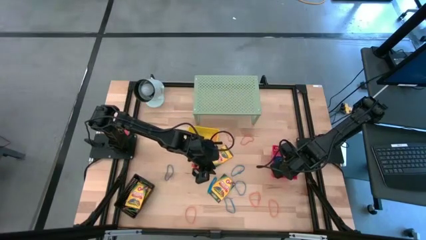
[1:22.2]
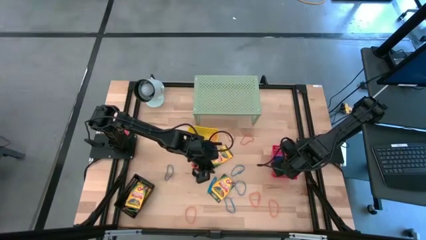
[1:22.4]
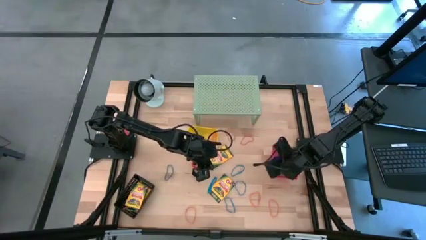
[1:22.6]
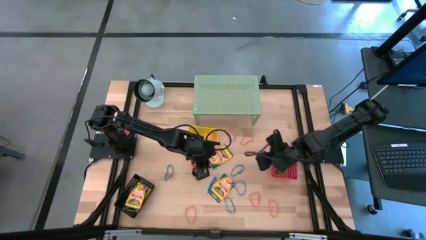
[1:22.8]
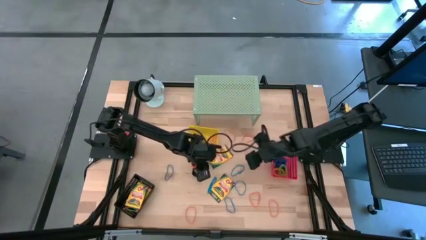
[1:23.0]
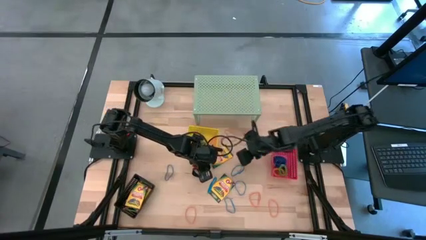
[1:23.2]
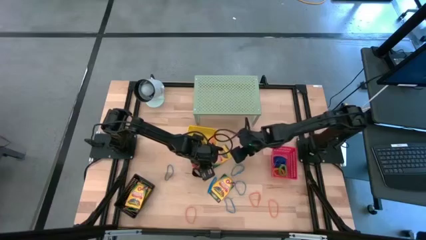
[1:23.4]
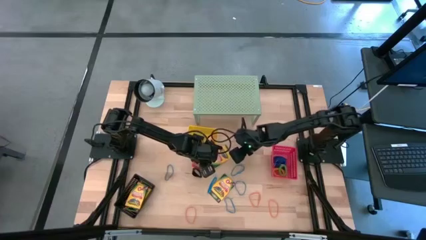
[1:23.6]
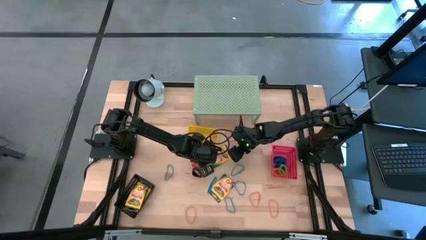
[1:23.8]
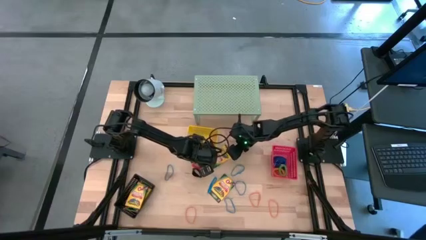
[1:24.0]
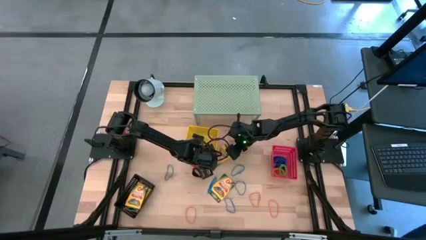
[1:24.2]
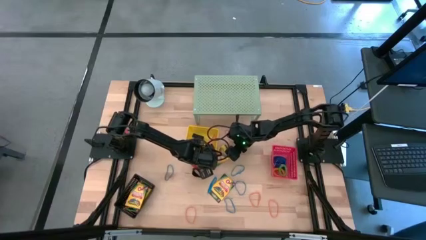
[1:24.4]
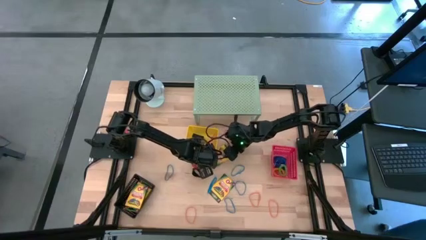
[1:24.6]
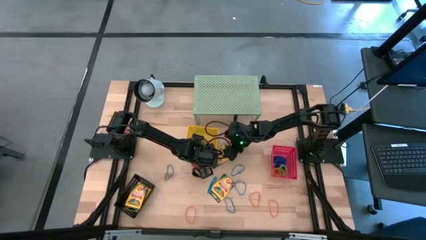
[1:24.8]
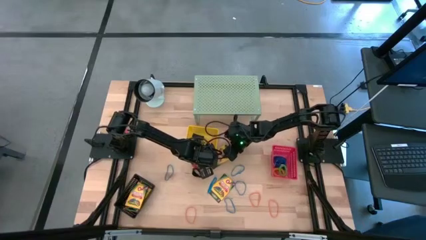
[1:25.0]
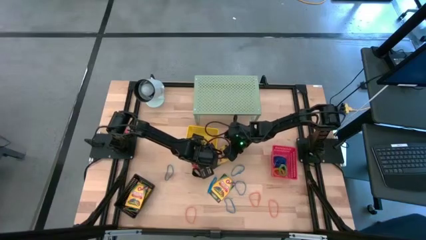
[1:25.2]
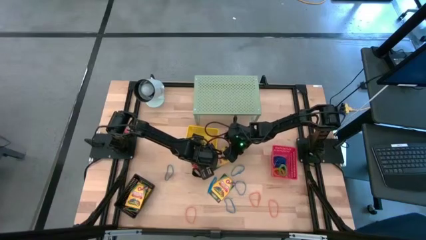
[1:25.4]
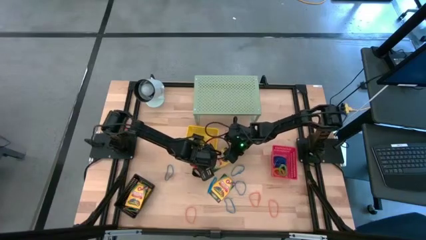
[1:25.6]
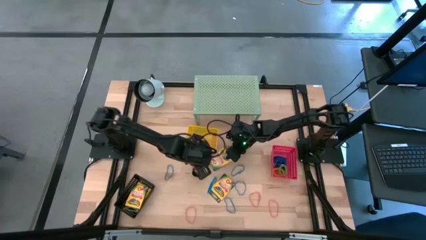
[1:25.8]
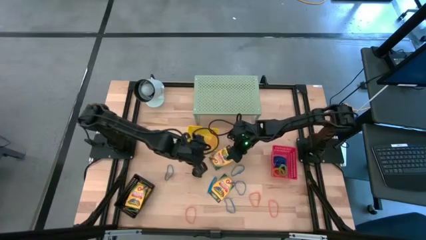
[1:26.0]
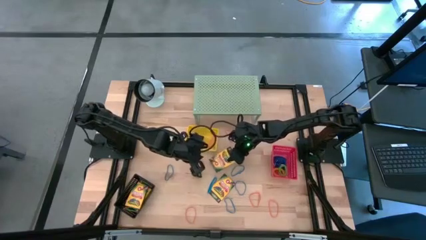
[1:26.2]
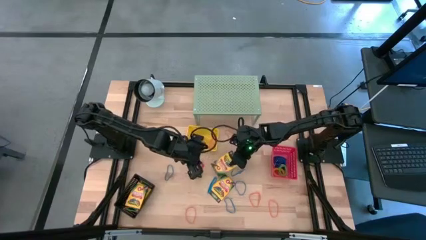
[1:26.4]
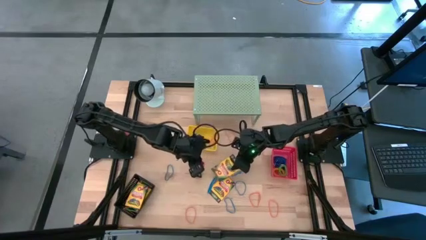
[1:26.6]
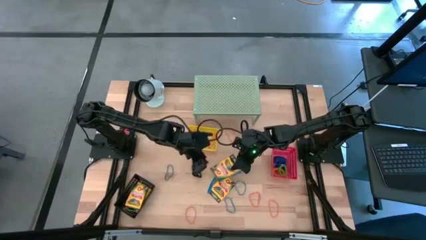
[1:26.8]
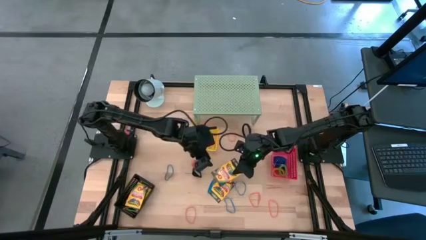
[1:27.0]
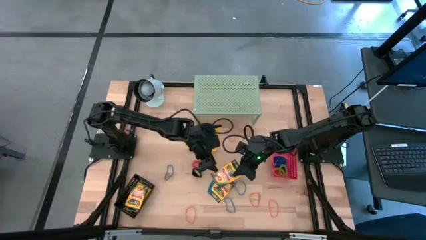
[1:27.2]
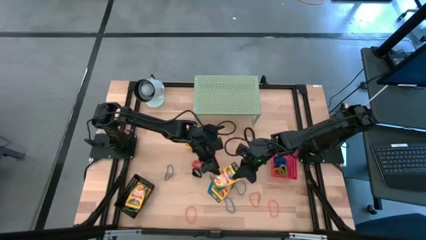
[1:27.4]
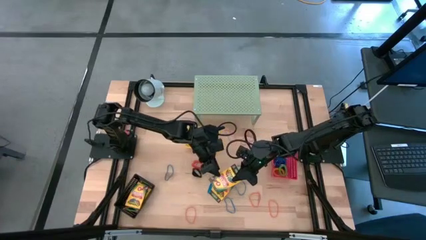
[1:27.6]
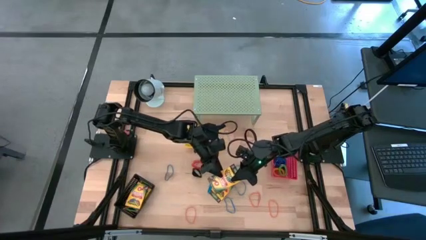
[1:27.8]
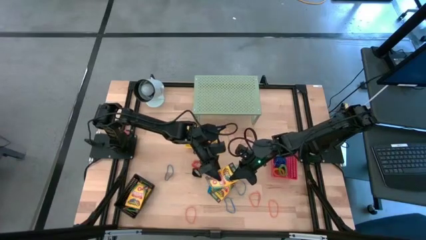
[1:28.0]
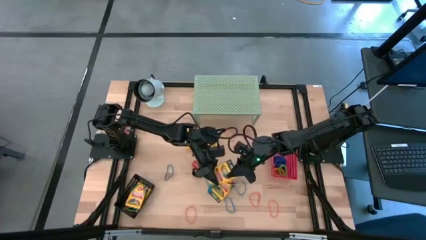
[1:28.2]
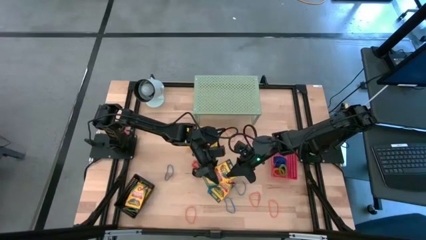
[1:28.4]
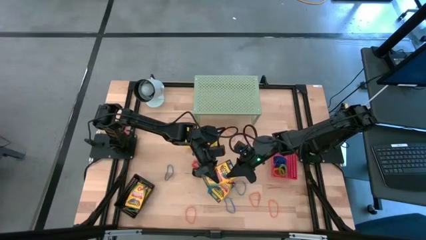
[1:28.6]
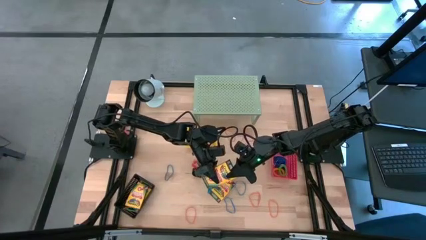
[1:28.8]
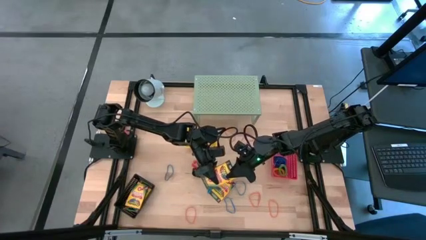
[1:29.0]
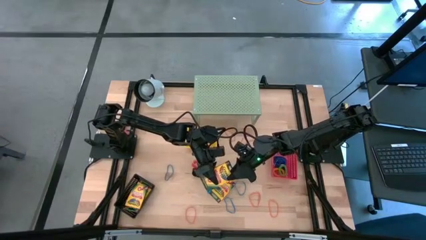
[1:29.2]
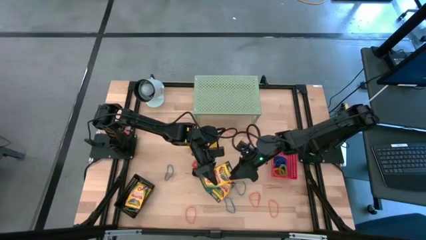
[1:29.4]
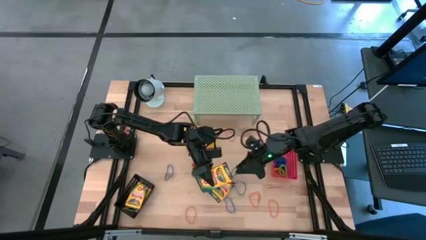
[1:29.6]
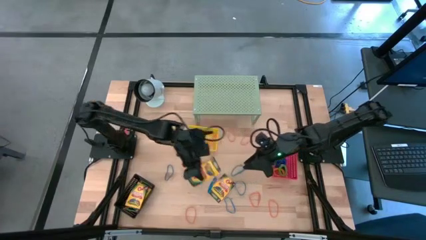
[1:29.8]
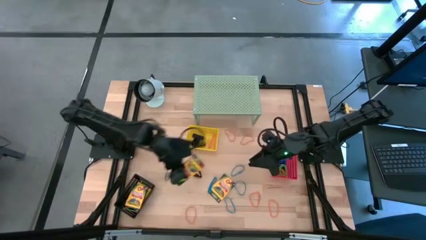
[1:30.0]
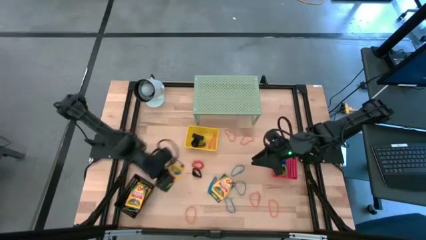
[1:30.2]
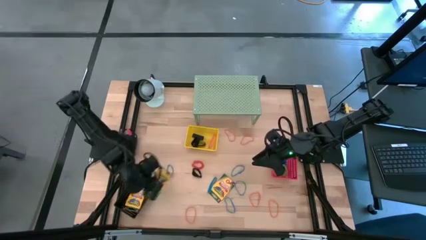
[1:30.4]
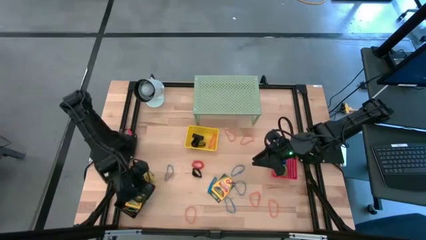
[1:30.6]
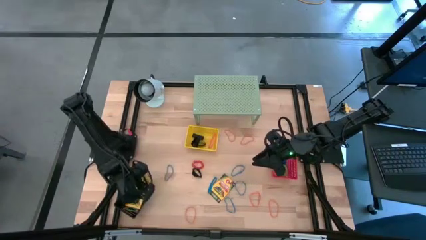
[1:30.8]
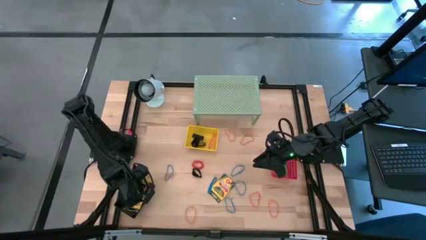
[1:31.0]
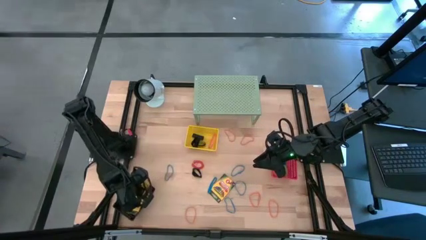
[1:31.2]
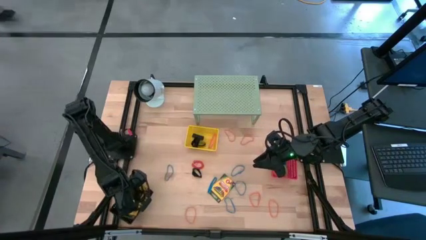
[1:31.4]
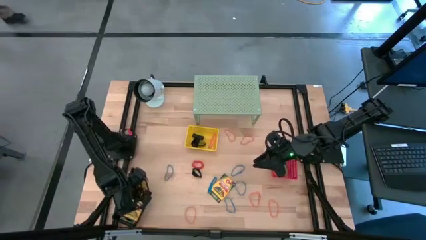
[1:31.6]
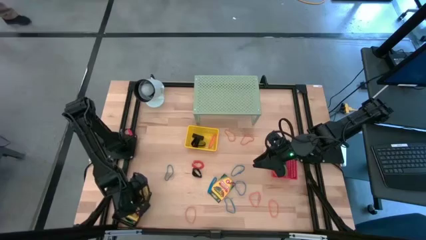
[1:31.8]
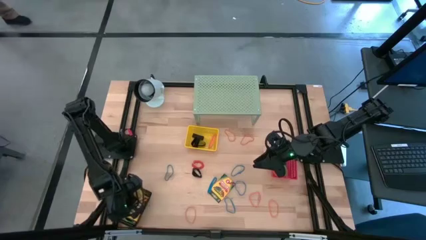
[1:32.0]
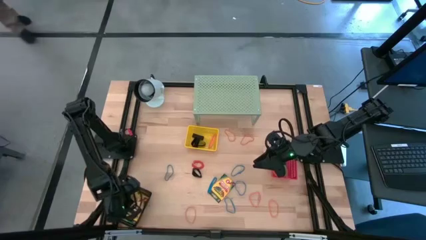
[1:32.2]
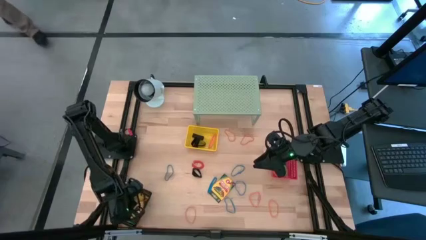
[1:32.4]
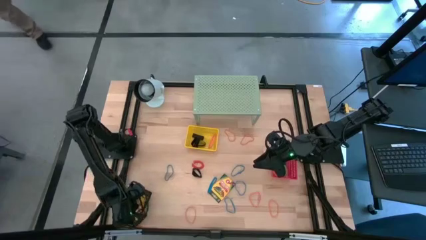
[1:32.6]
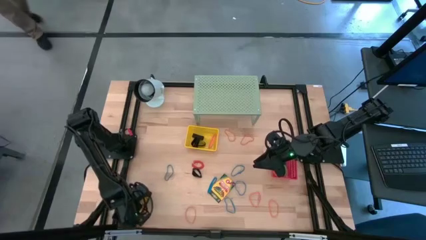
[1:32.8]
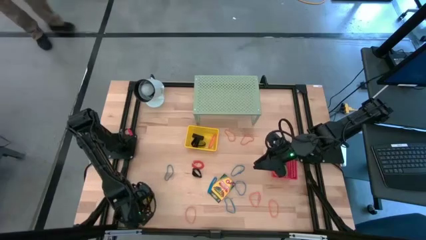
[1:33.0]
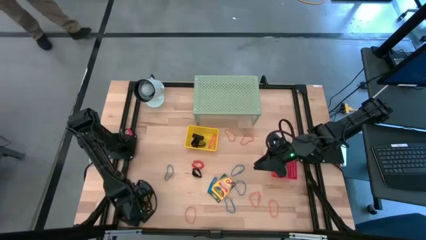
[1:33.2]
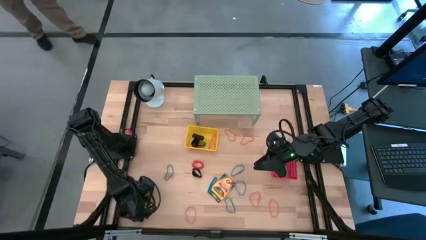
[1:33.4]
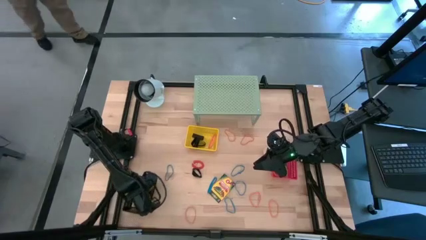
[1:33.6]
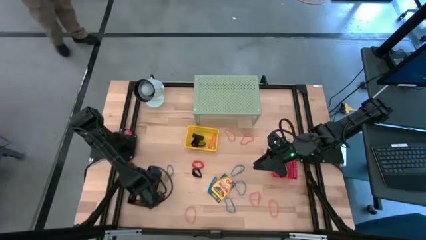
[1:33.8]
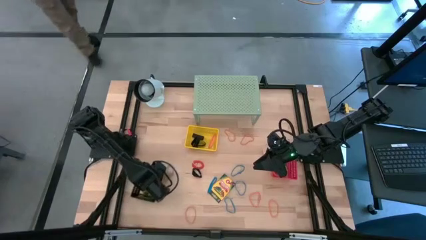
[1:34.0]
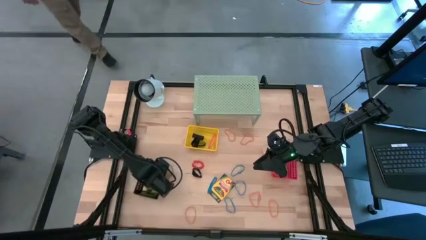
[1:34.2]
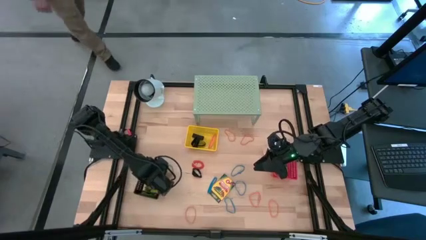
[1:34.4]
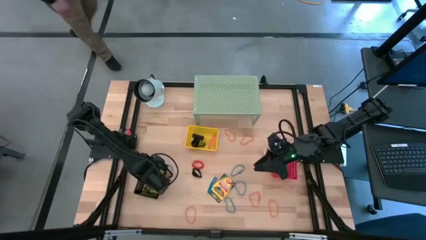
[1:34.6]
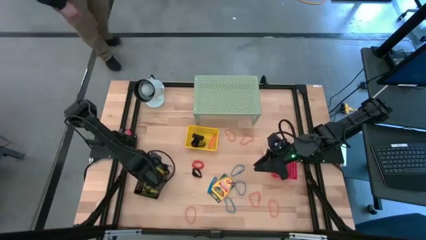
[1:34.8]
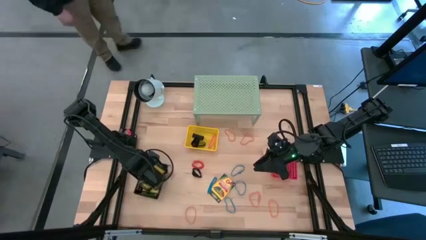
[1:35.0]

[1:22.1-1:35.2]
Task: Pick & Place Office Desk Supplies
Put the crayon box into the black bin

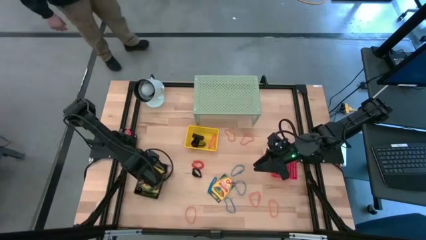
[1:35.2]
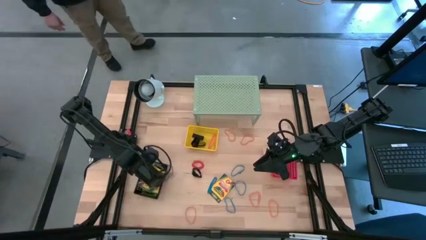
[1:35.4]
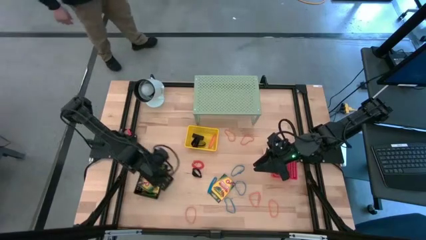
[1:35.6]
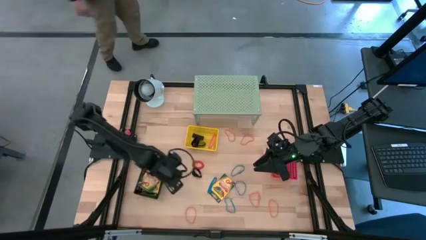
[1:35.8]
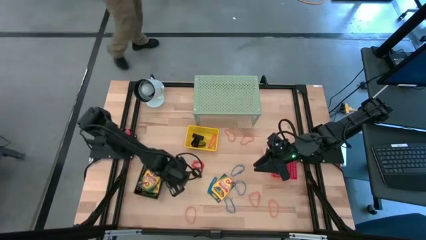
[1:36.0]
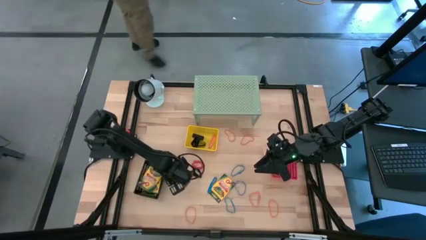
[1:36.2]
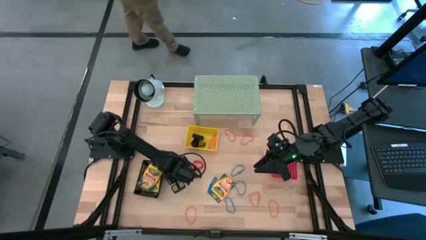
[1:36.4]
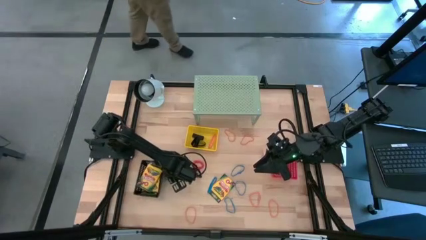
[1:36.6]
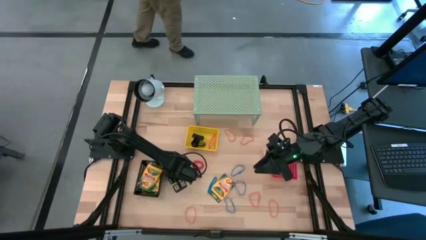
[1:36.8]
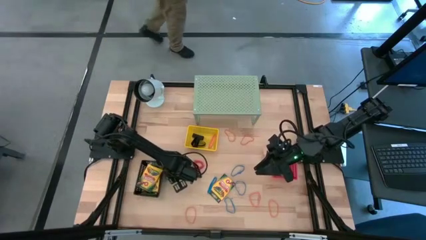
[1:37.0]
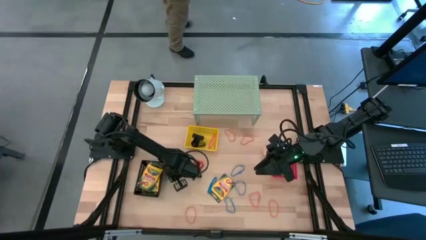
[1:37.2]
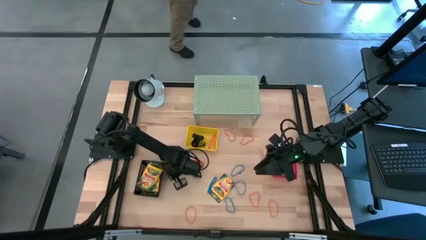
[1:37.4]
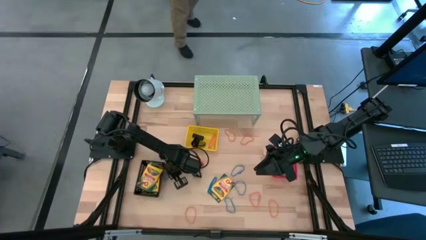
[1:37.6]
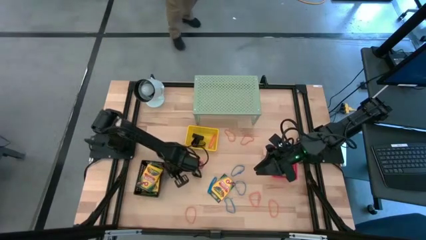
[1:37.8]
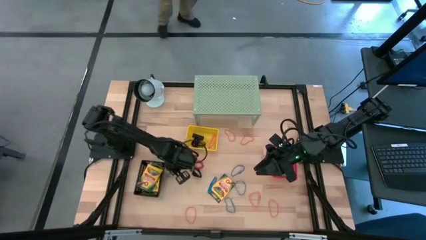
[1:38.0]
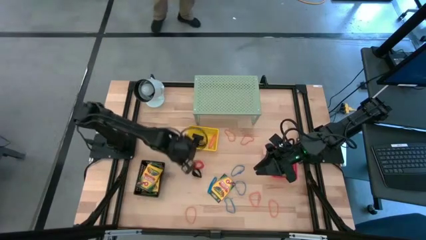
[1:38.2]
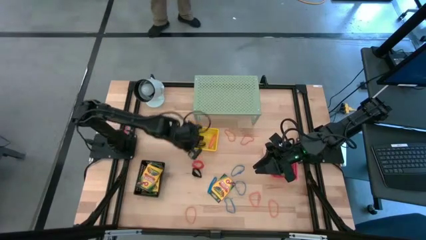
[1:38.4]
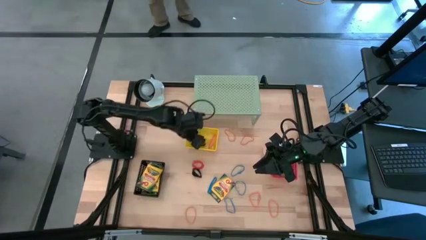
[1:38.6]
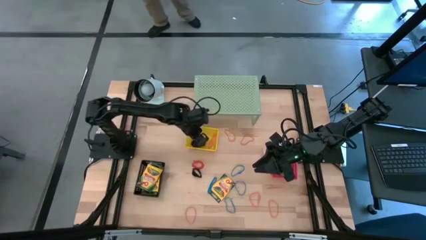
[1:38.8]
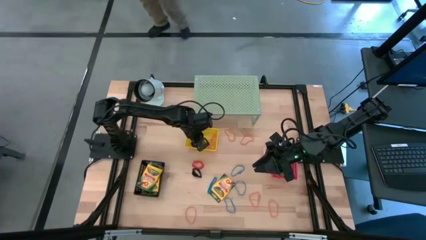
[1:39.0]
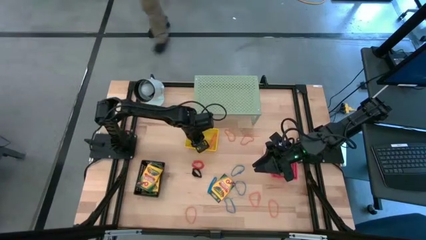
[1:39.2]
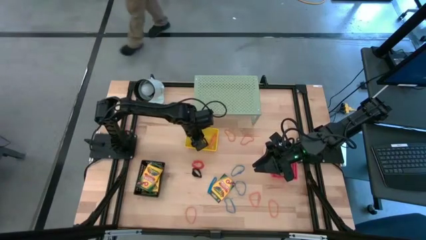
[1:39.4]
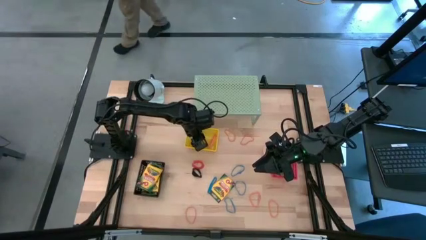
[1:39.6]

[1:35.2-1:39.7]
Put the blue rubber band into the yellow bin
